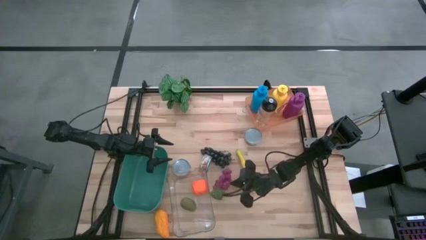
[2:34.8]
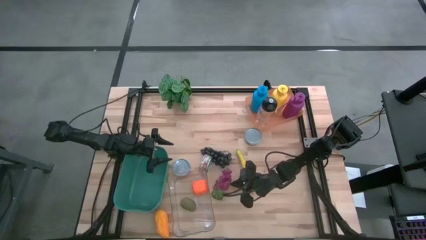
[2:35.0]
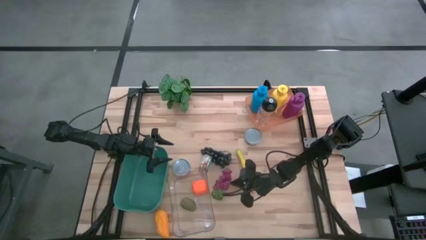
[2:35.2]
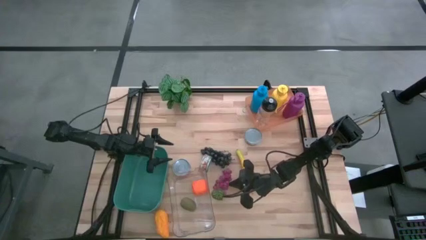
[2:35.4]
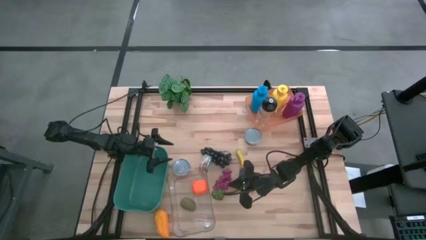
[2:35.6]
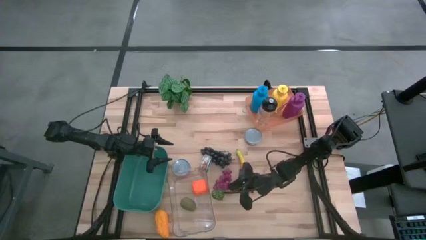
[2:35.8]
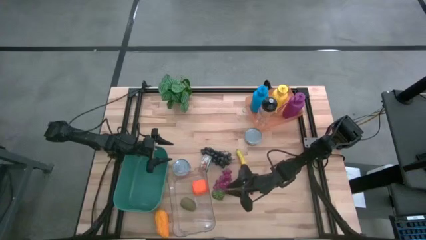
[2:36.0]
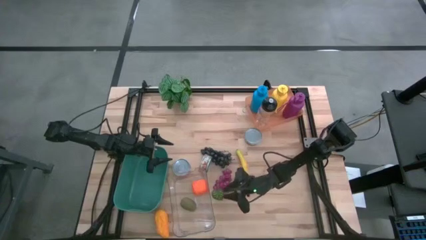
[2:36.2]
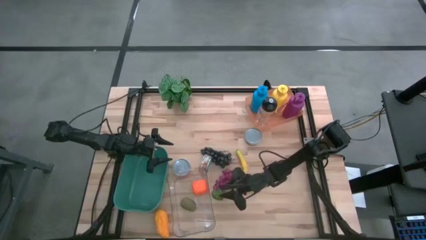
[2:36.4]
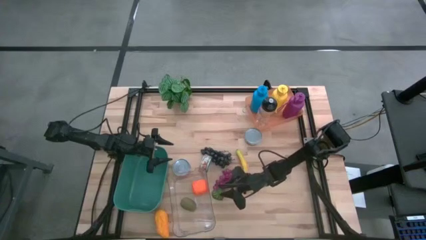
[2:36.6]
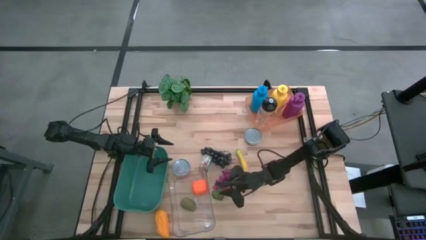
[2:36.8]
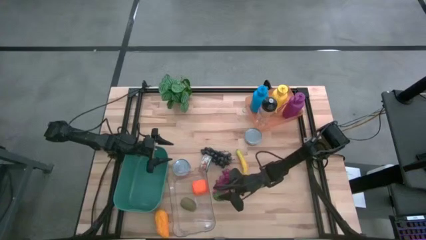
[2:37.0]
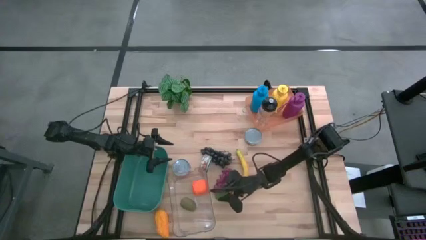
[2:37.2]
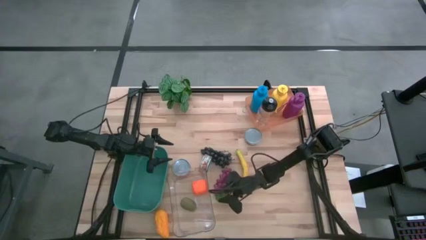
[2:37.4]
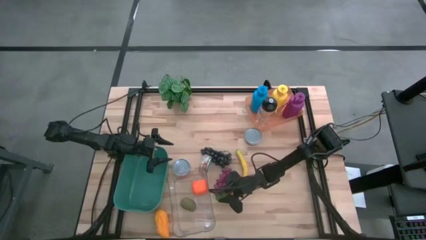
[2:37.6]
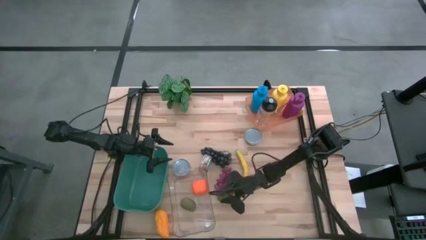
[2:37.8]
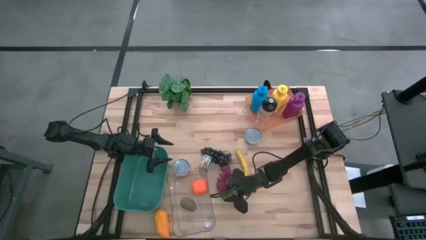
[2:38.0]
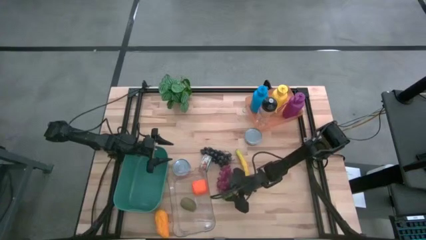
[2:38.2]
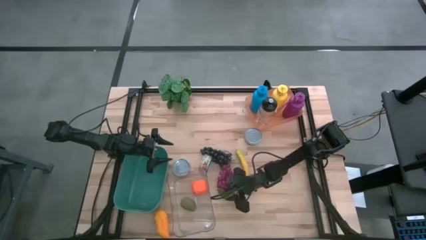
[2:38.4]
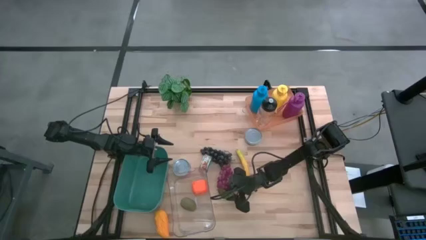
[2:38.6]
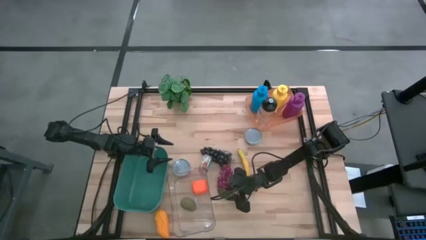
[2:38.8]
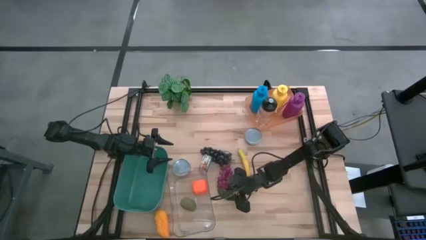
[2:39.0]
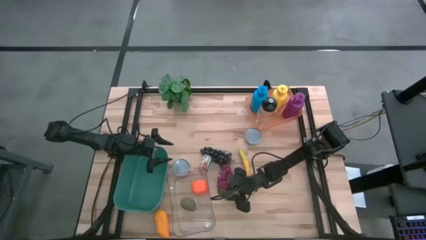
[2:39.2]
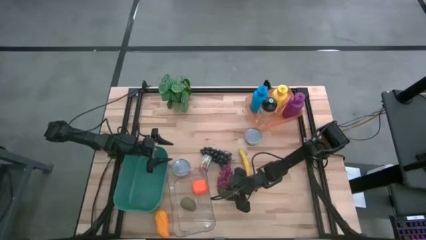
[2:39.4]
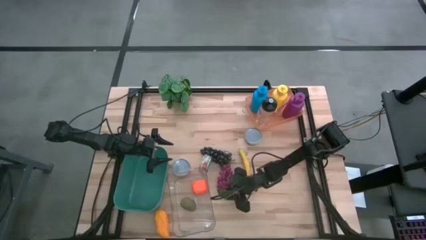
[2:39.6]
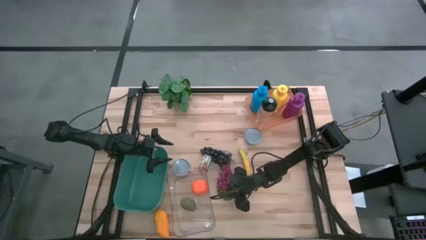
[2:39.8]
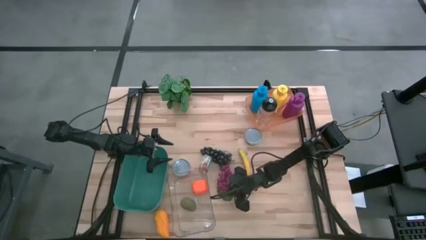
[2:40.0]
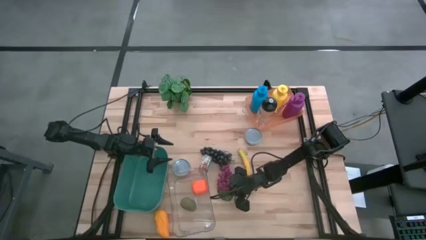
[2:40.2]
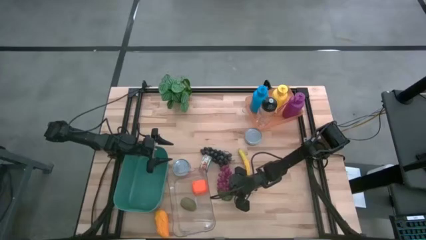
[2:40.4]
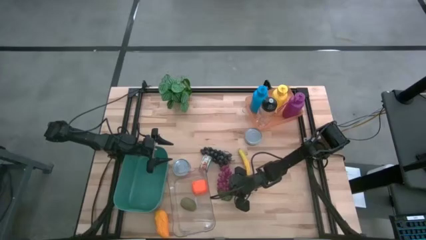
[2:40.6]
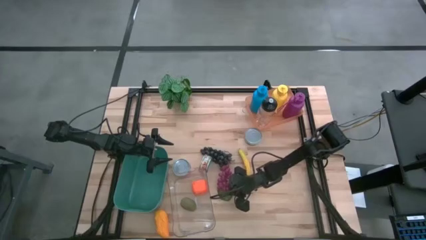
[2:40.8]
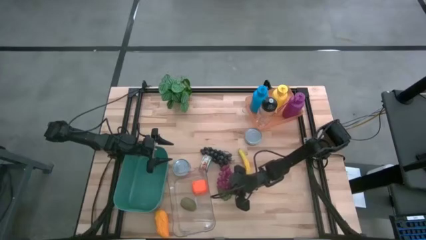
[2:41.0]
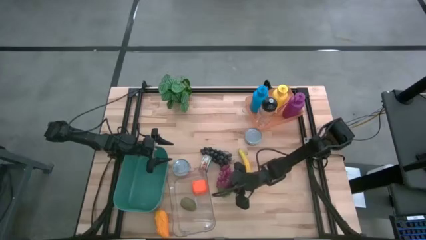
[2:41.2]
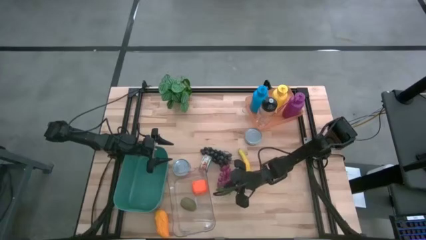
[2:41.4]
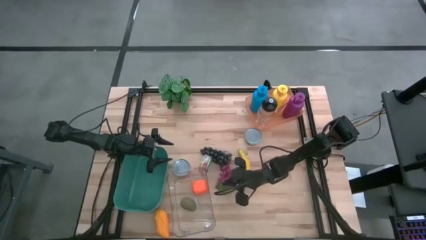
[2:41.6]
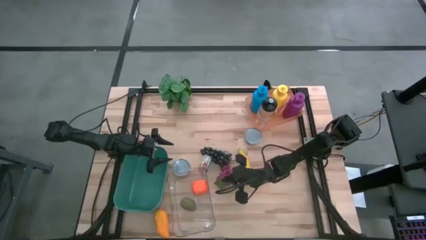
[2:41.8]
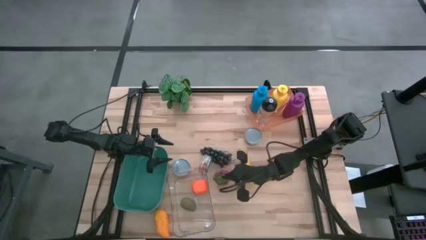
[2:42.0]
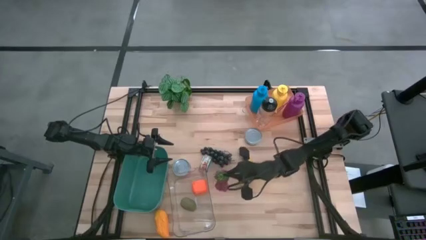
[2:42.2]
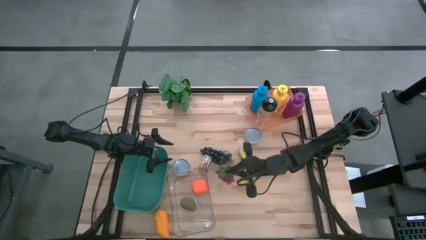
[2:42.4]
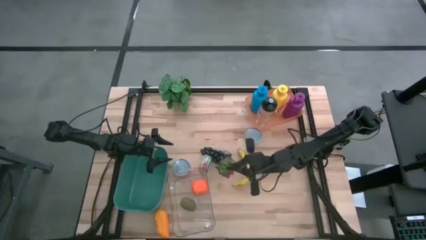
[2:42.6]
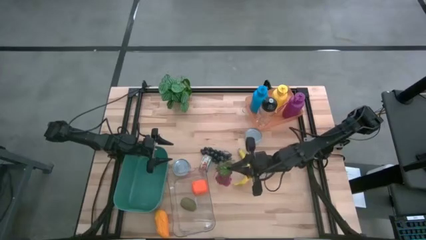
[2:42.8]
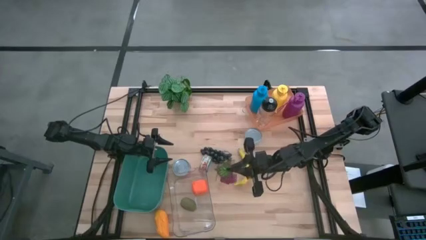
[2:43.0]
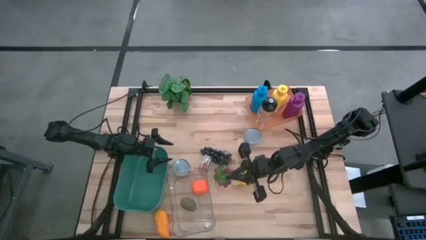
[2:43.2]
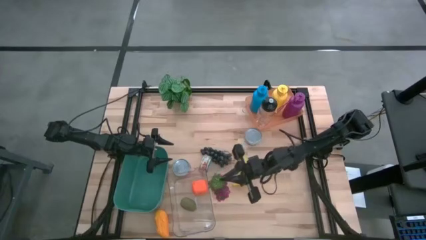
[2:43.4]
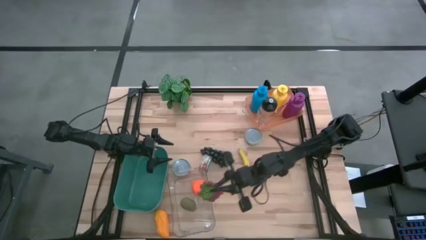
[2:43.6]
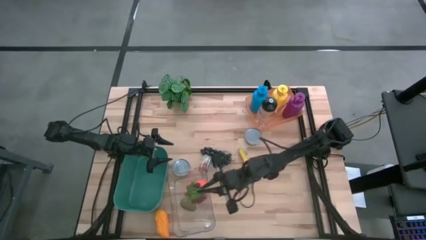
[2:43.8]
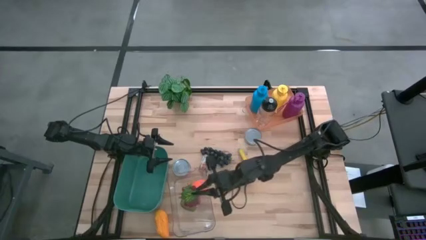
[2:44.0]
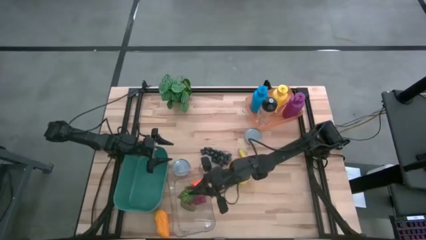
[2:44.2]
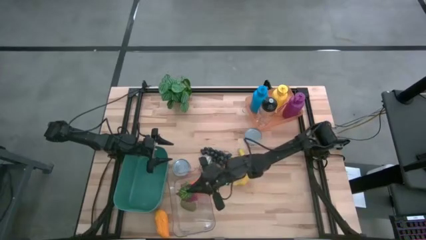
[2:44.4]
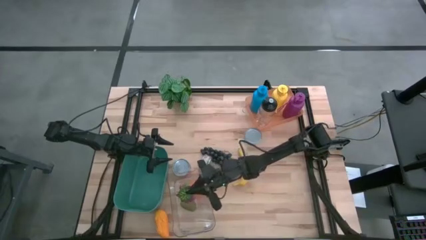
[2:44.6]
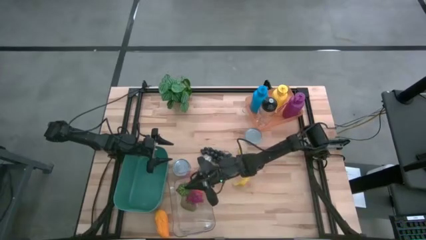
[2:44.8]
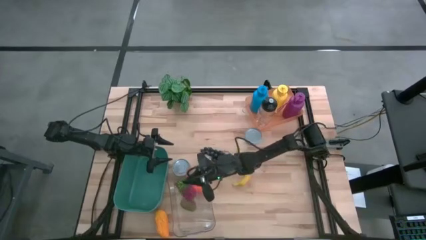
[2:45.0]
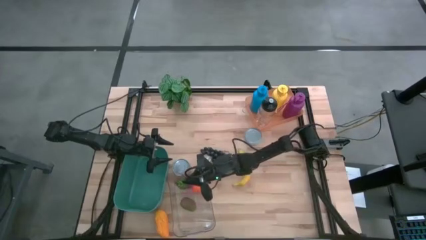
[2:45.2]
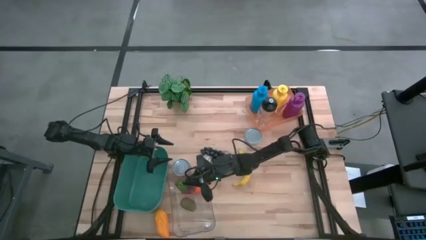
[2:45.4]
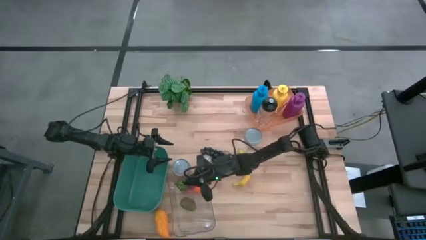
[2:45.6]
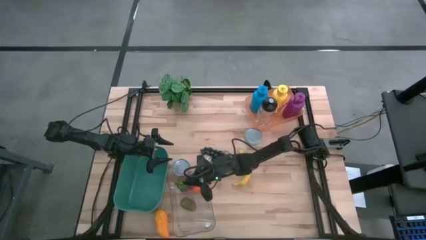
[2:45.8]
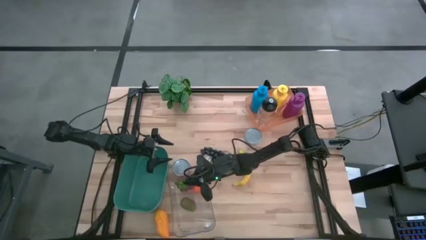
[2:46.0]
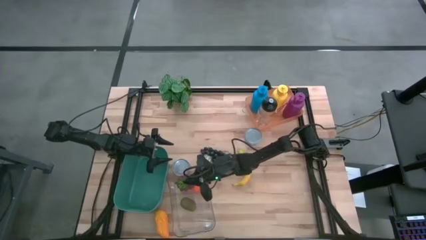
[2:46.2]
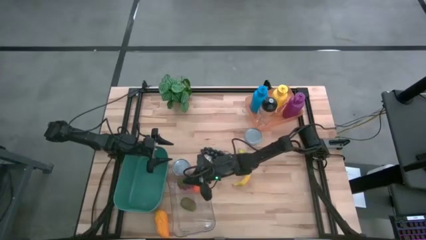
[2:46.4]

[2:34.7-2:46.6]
Task: Pick & Place Food Item
Put the red grapes into the transparent bin

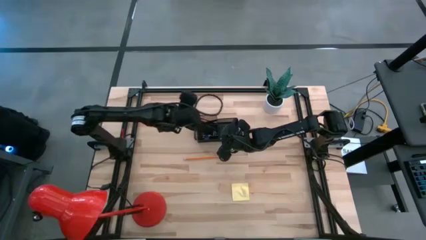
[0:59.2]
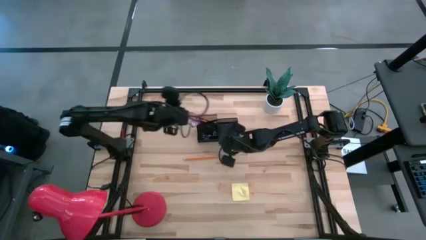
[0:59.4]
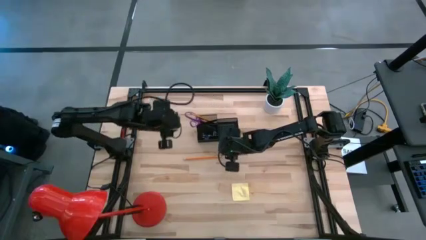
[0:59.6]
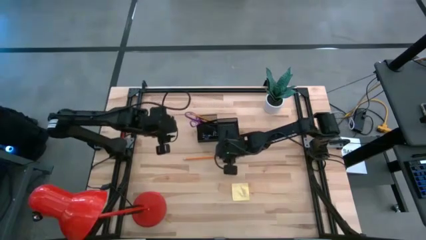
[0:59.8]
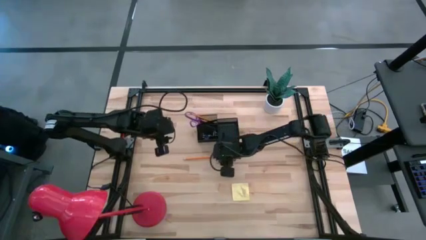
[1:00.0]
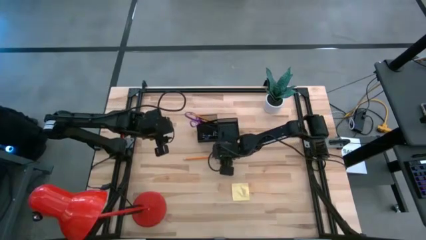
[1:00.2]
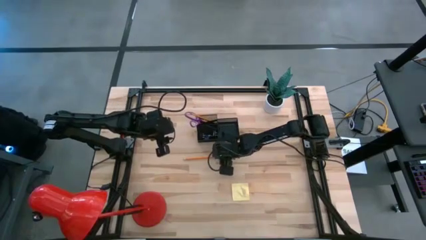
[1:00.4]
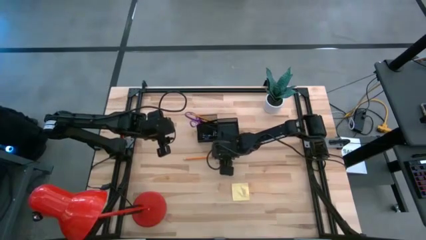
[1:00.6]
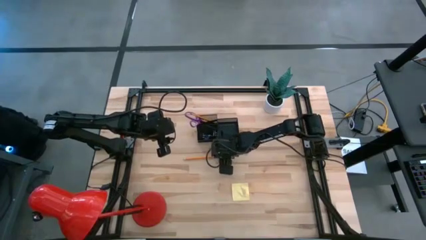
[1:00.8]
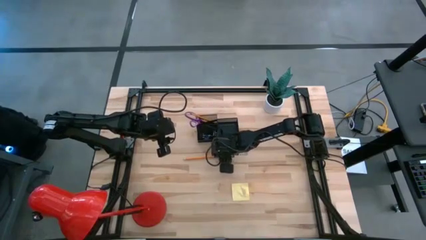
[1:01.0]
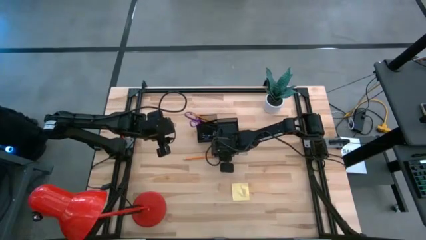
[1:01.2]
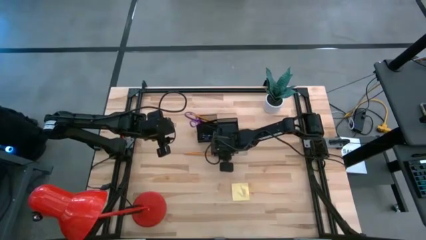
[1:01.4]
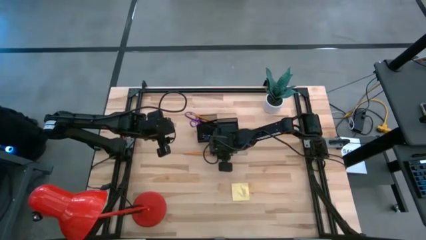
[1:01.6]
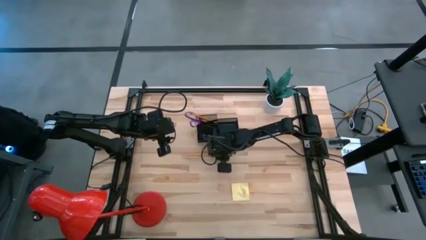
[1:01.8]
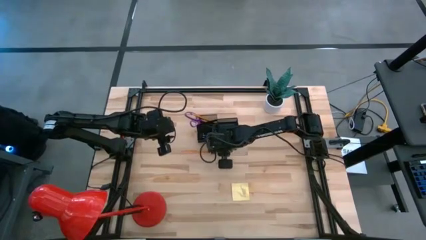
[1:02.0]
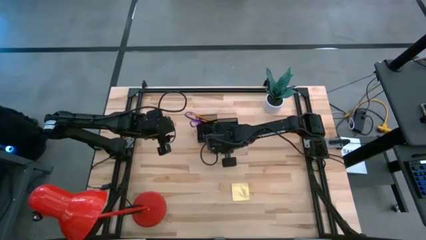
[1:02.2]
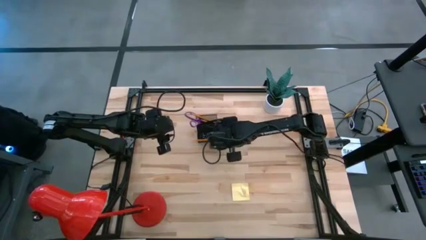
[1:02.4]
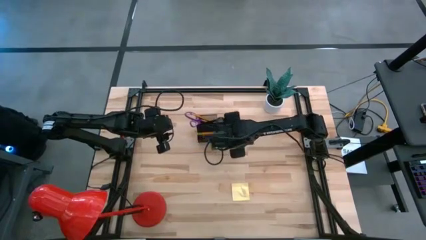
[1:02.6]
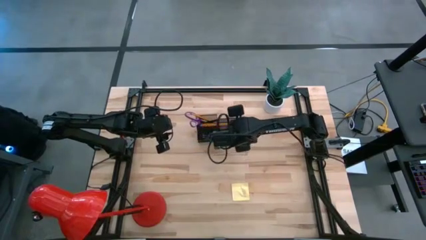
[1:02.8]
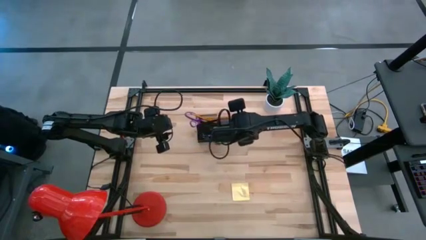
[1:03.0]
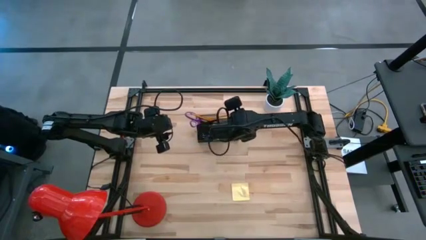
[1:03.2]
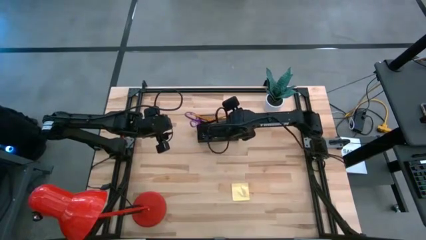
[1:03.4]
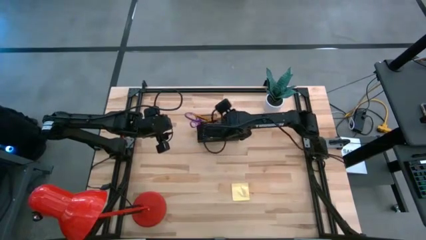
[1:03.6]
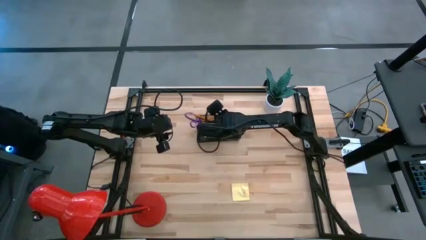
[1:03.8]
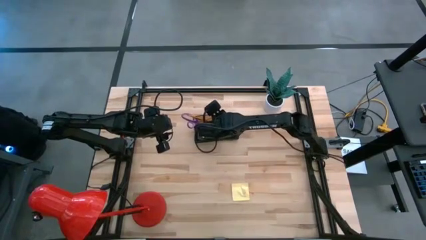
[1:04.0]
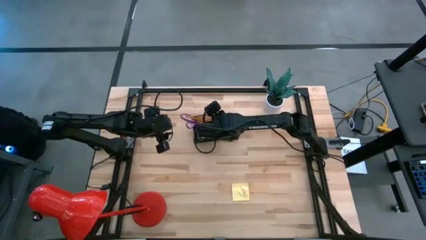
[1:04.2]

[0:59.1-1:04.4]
Task: Pick and place office supplies into organizer
Put the orange pencil into the black desk organizer
